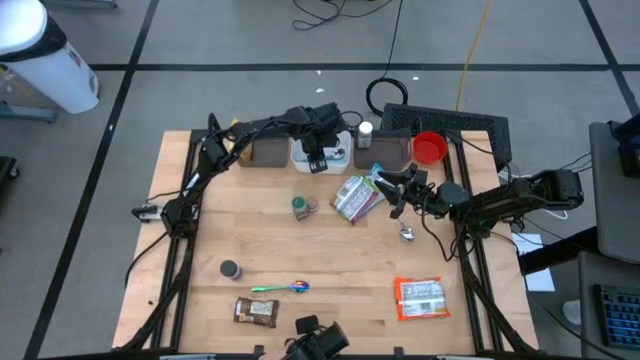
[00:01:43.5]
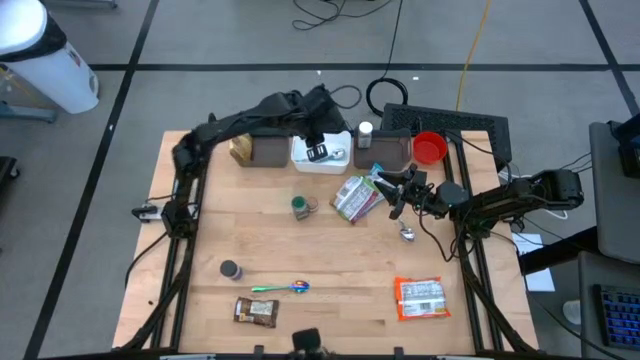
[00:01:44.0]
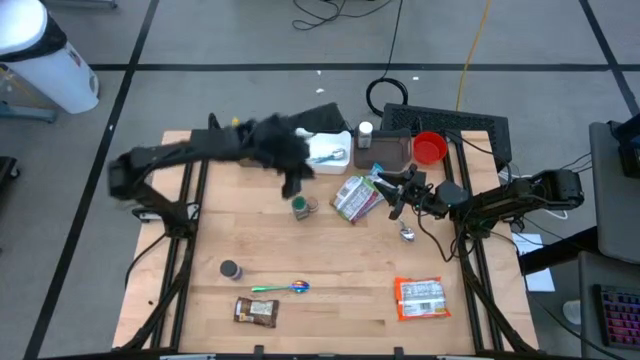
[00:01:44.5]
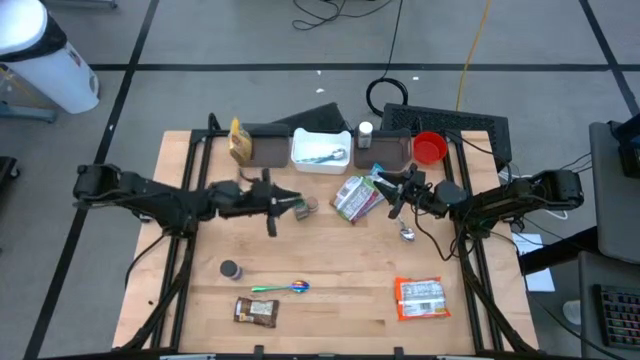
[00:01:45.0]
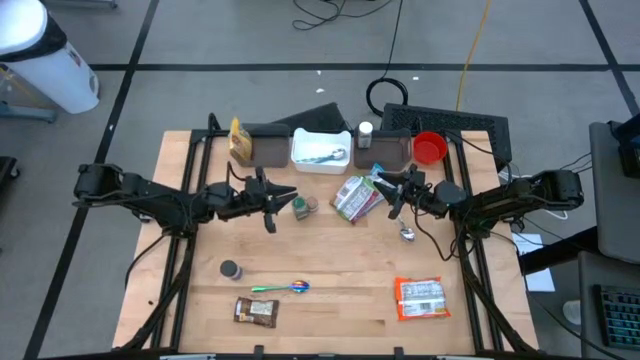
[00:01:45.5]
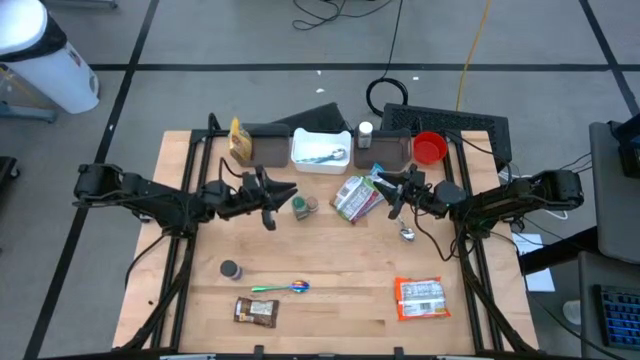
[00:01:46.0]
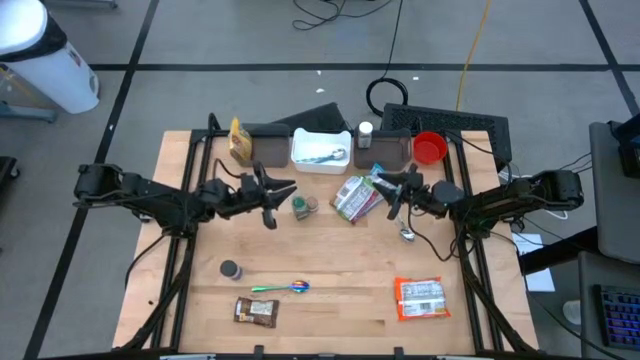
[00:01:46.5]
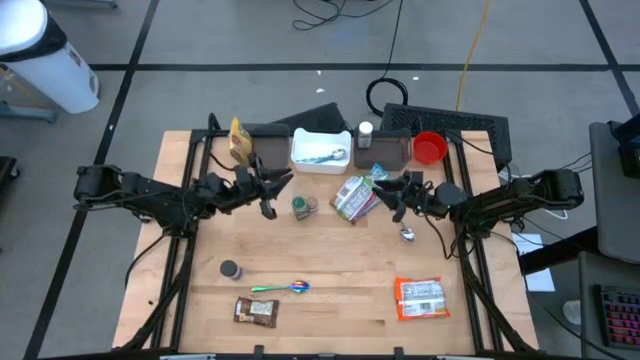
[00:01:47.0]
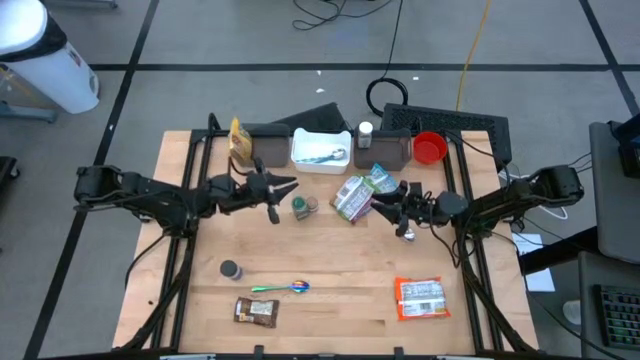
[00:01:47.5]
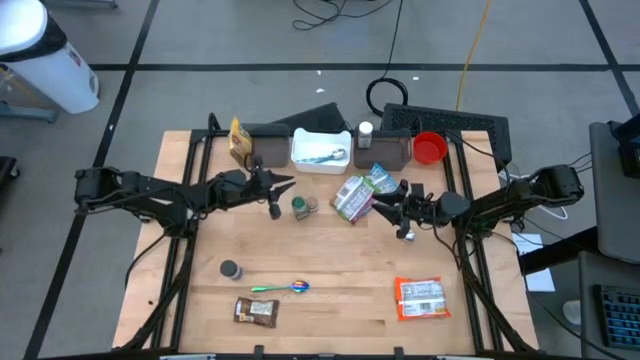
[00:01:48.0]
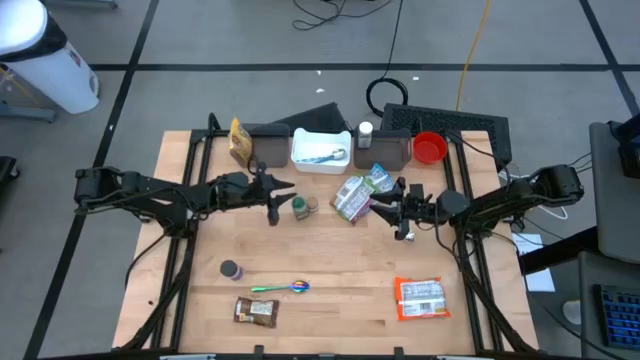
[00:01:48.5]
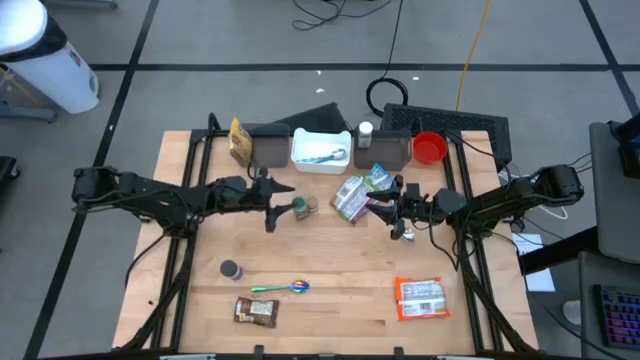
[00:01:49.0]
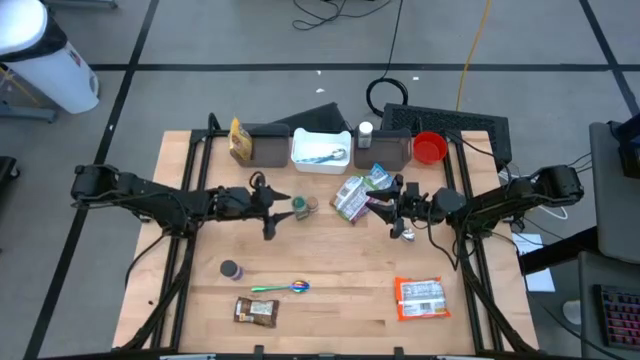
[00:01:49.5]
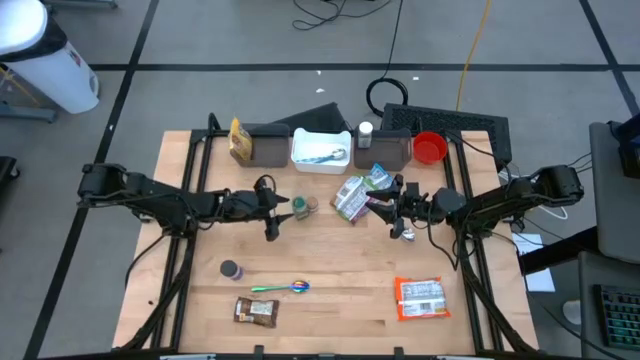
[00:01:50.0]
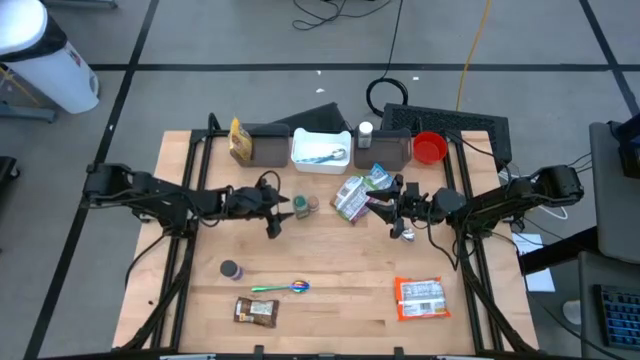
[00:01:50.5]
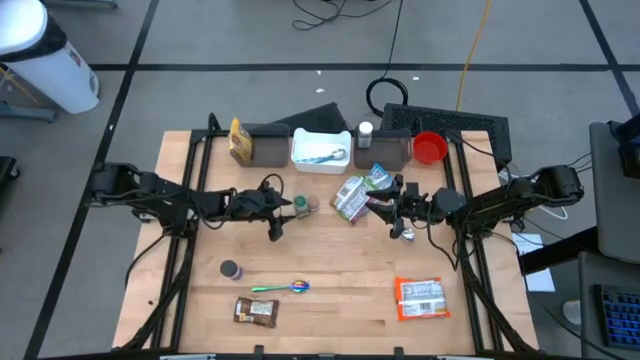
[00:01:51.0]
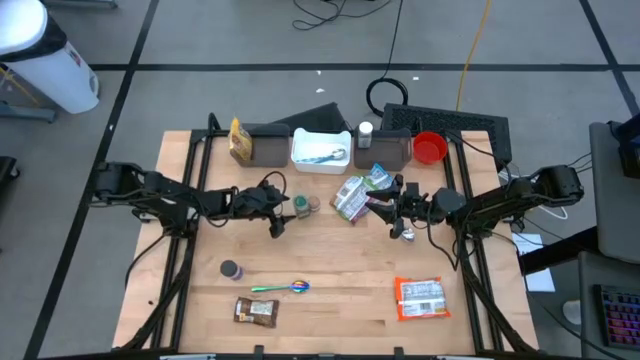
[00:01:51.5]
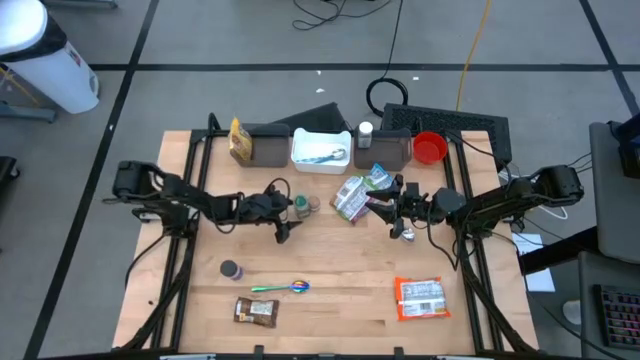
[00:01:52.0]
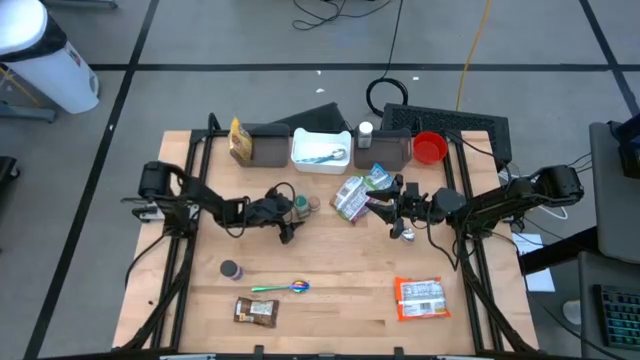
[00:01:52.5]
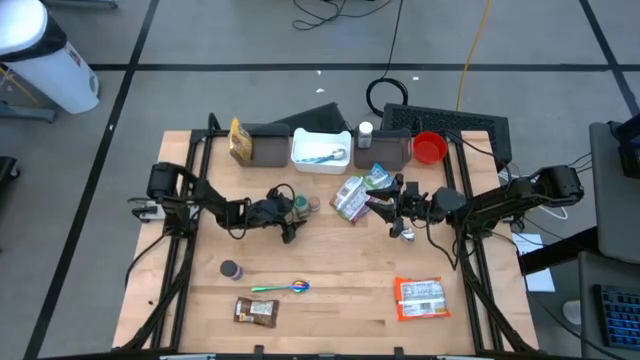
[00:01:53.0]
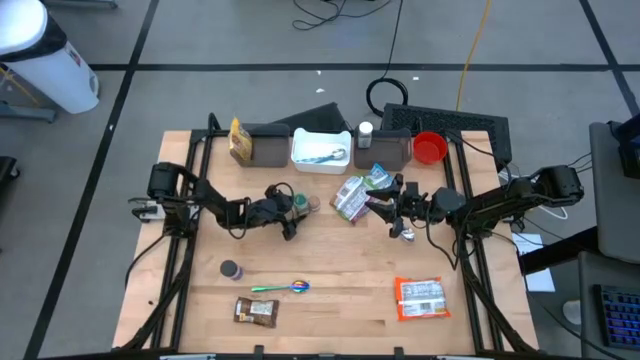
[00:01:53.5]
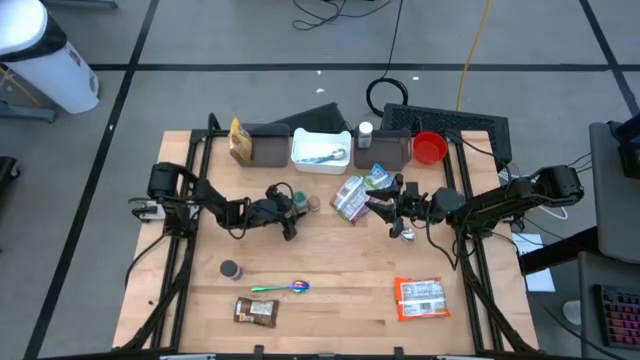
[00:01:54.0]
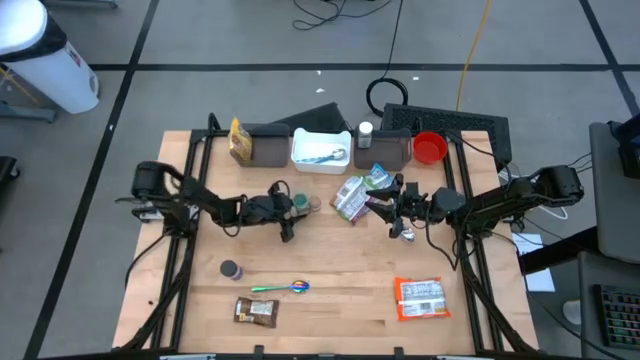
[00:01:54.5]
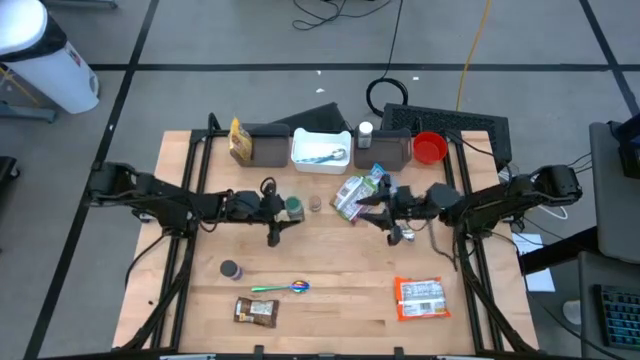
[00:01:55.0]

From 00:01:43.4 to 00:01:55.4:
Task: Pick & Place Food Item
Put the green seasoning bottle into the right black bin

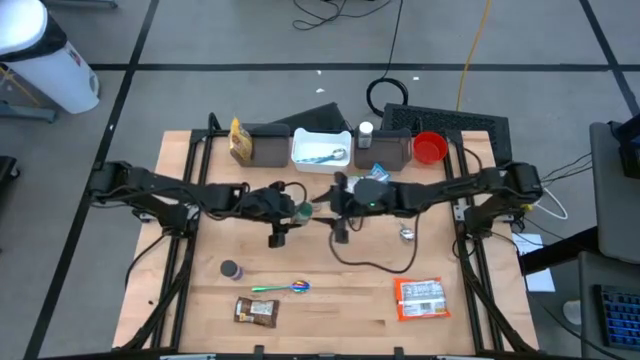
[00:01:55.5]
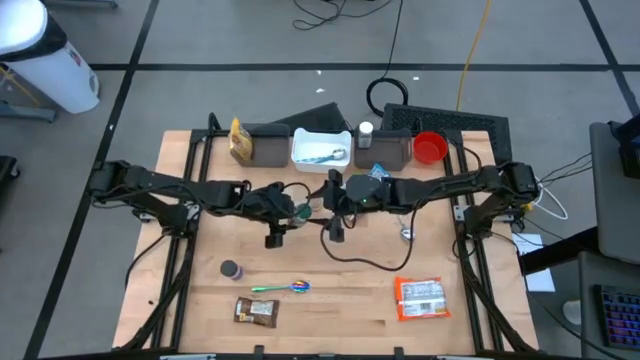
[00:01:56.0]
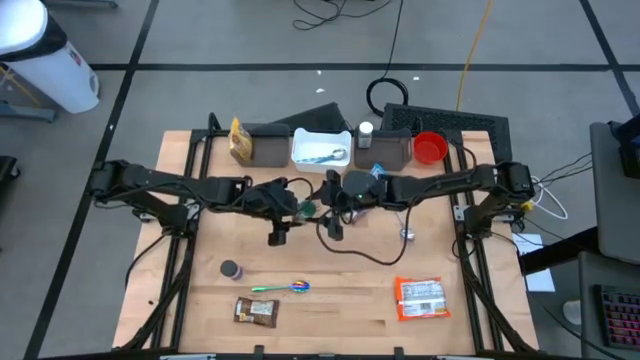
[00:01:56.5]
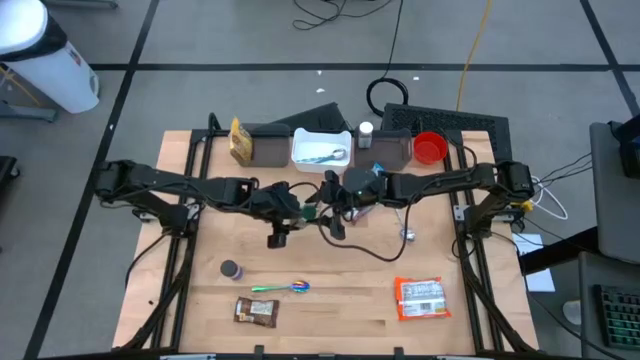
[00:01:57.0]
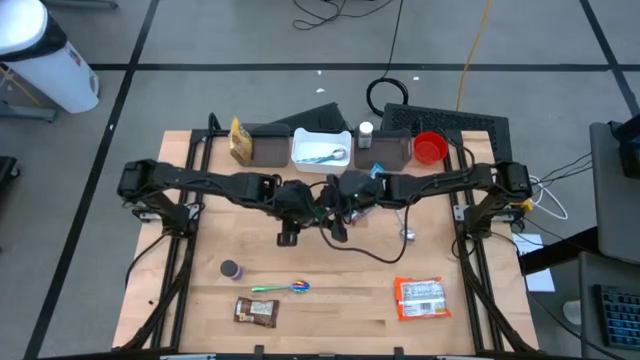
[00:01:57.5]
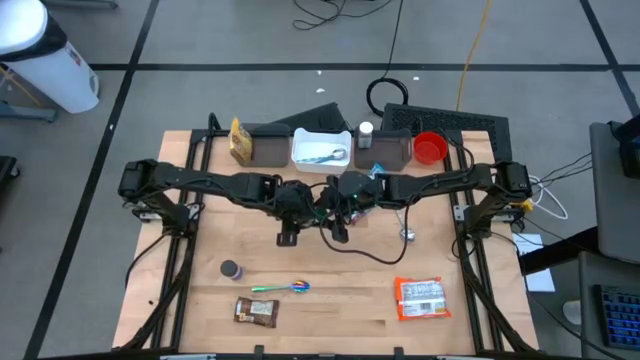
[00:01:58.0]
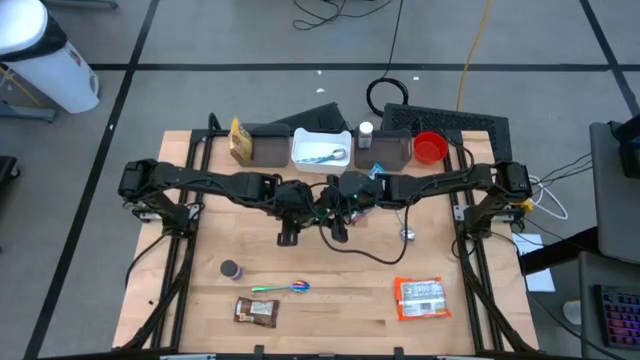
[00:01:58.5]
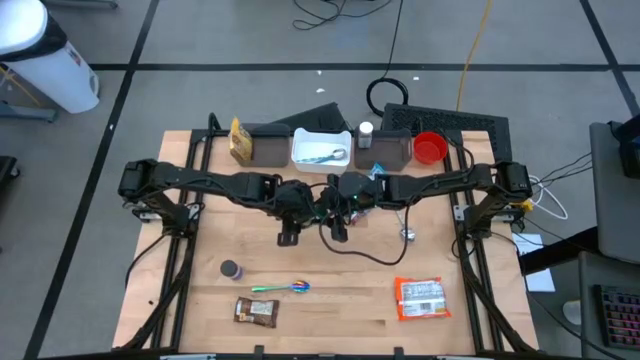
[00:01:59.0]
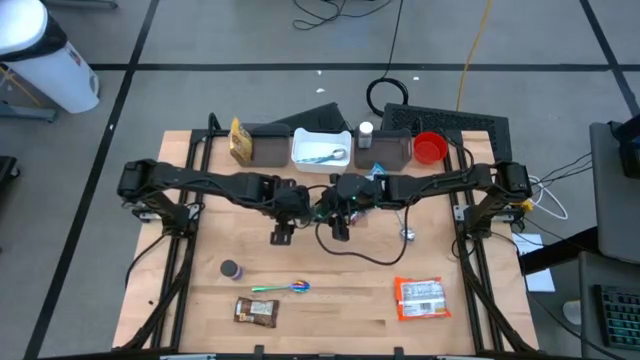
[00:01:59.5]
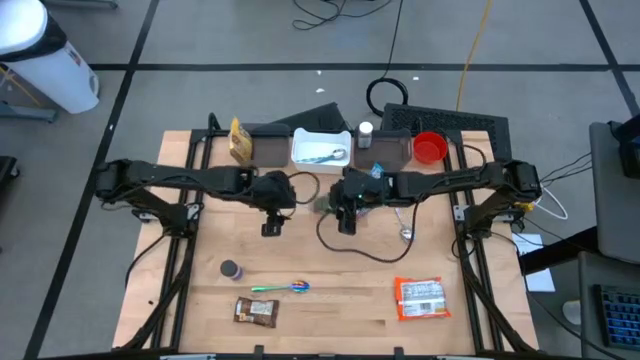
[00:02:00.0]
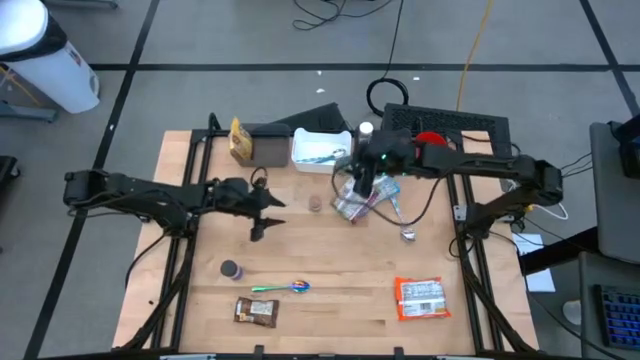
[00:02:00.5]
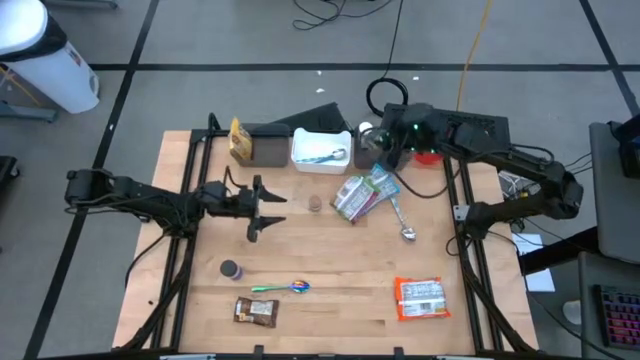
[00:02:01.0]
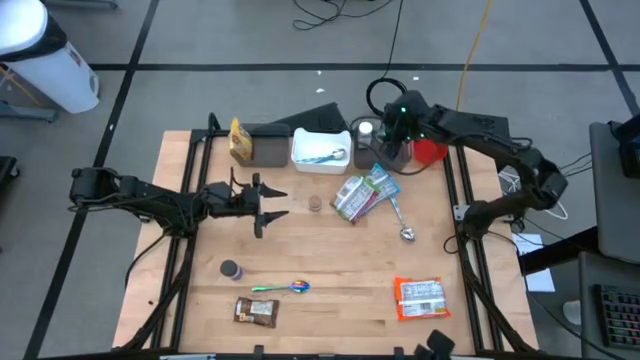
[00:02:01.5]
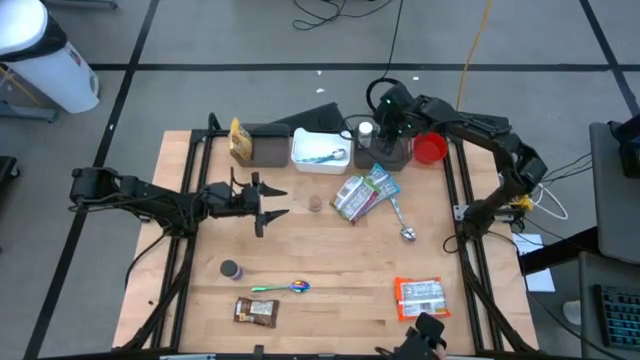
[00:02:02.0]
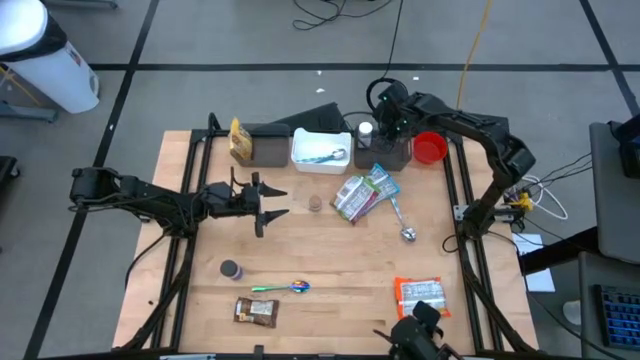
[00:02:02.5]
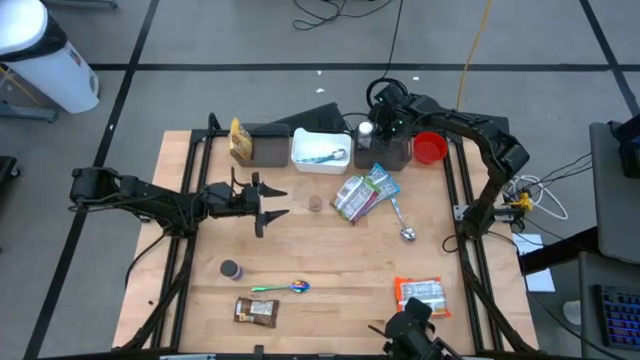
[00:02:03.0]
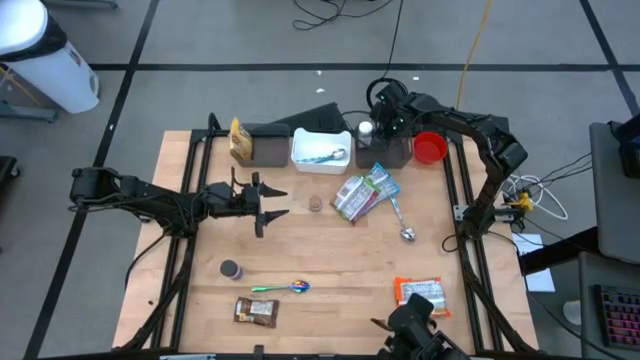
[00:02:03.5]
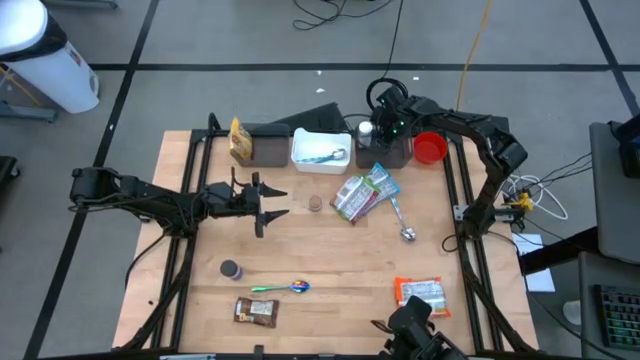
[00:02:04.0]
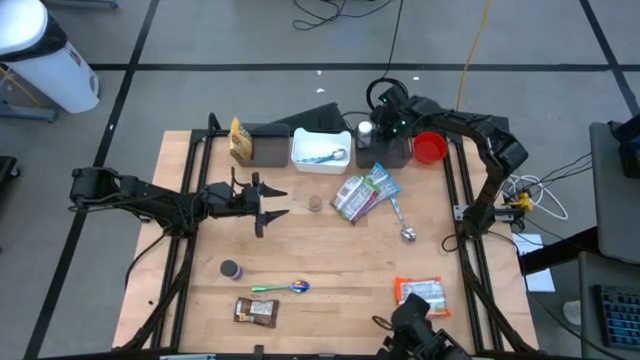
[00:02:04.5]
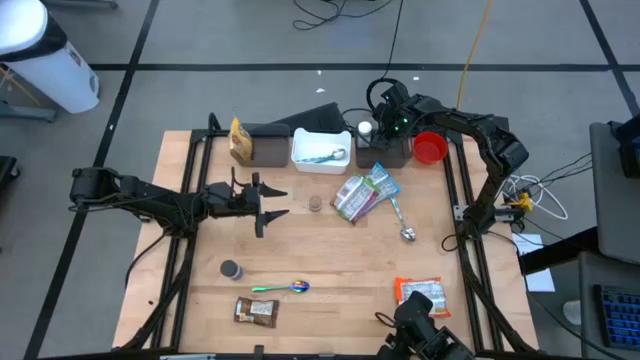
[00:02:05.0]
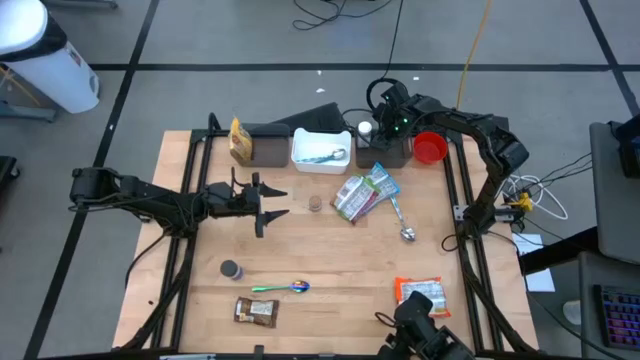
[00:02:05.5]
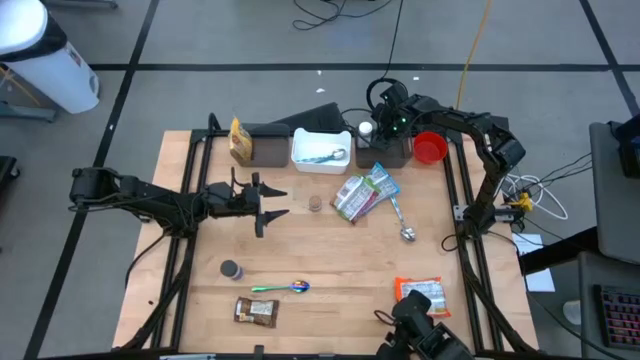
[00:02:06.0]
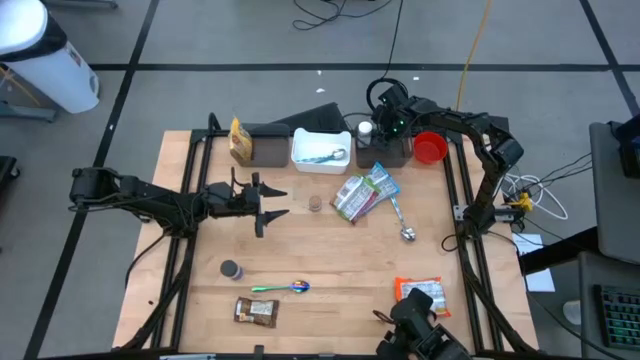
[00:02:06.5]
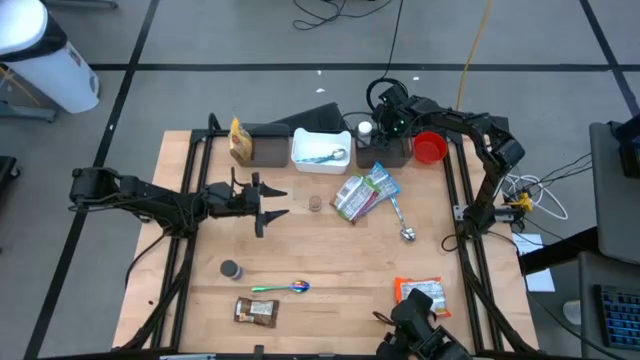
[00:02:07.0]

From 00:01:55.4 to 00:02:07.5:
Put the green seasoning bottle into the right black bin
